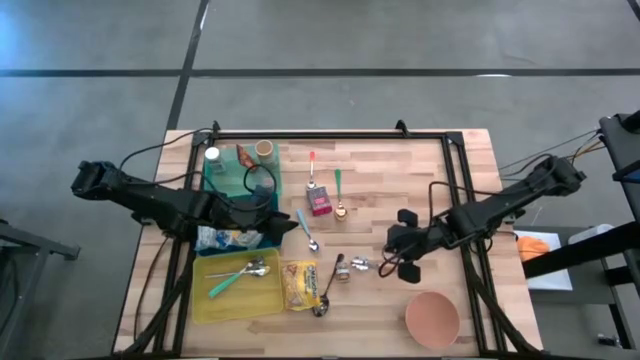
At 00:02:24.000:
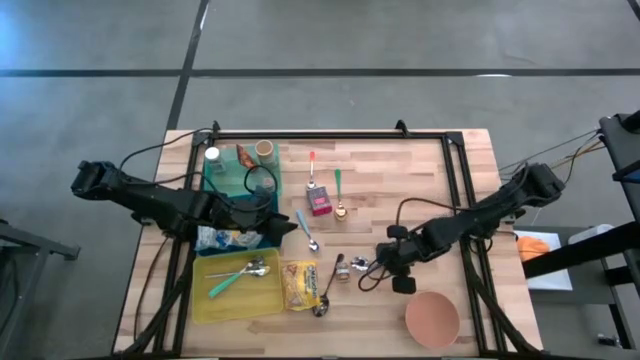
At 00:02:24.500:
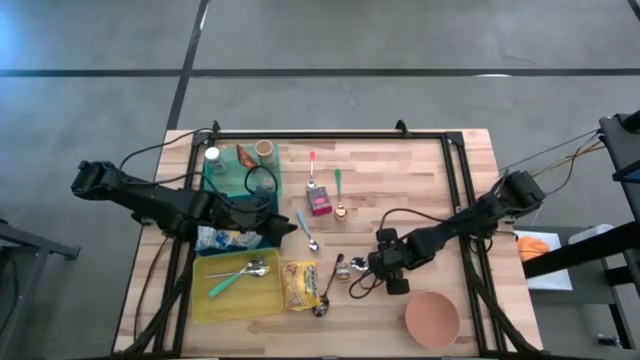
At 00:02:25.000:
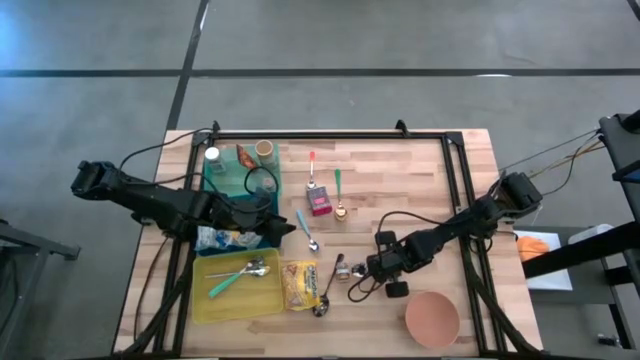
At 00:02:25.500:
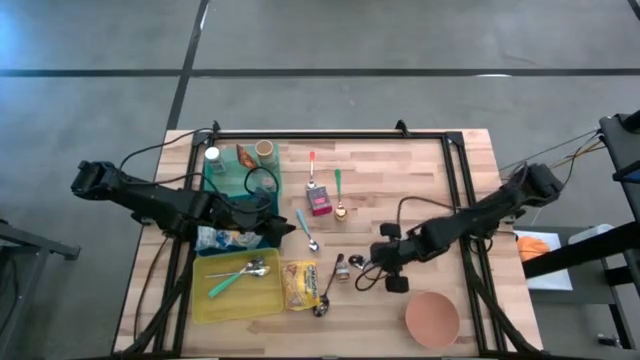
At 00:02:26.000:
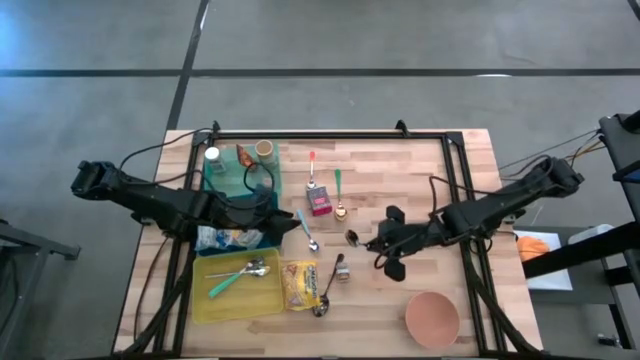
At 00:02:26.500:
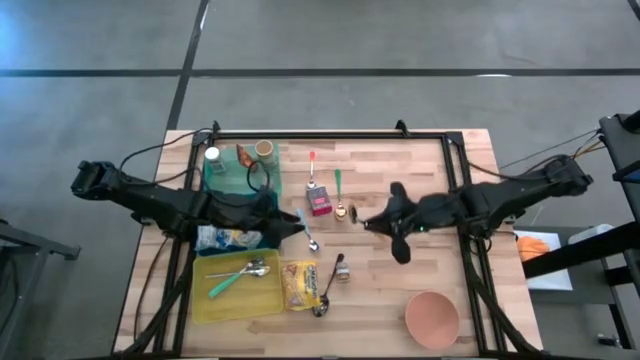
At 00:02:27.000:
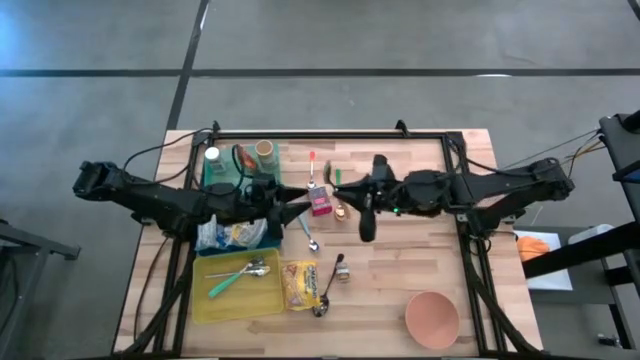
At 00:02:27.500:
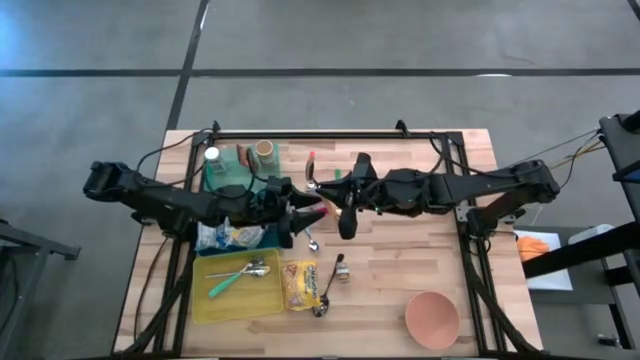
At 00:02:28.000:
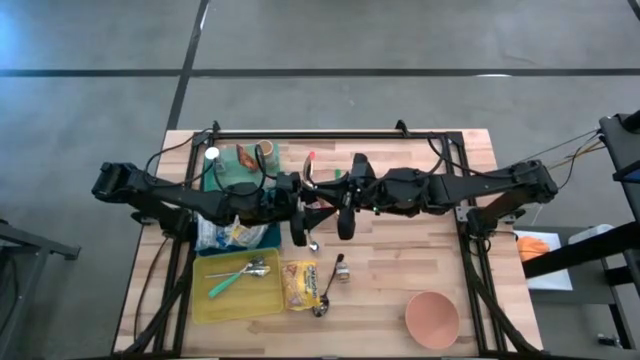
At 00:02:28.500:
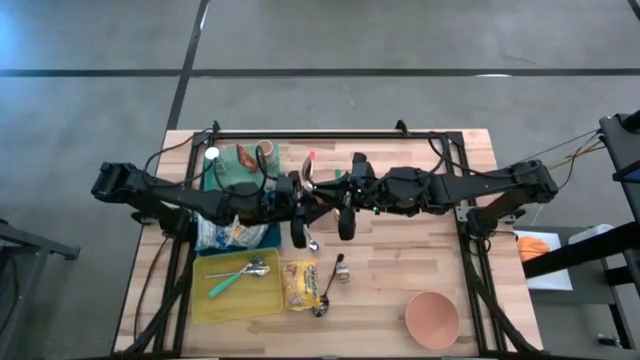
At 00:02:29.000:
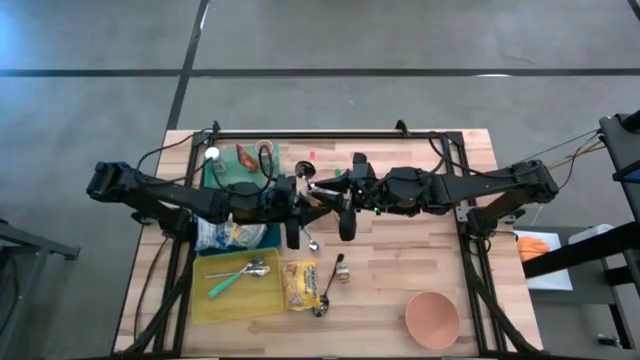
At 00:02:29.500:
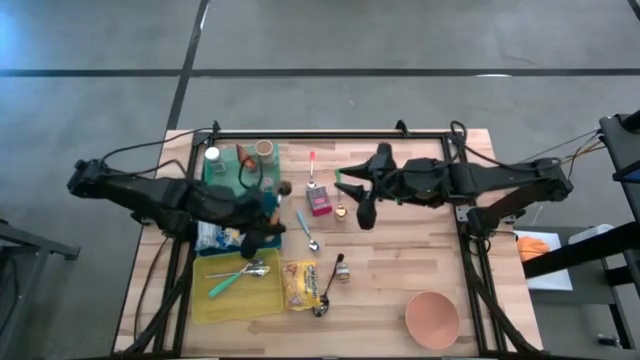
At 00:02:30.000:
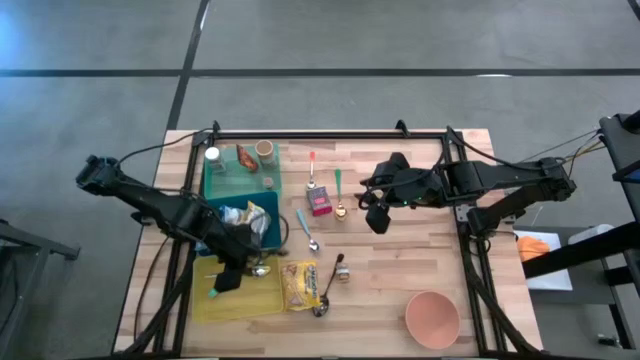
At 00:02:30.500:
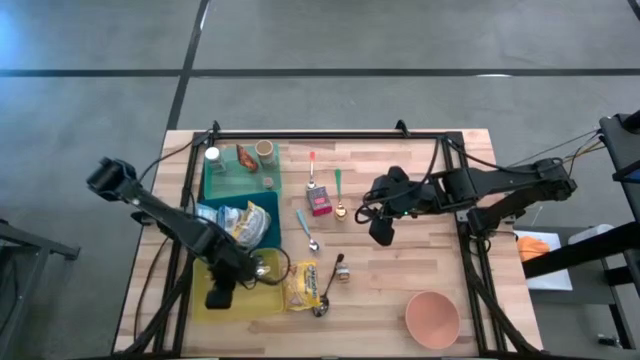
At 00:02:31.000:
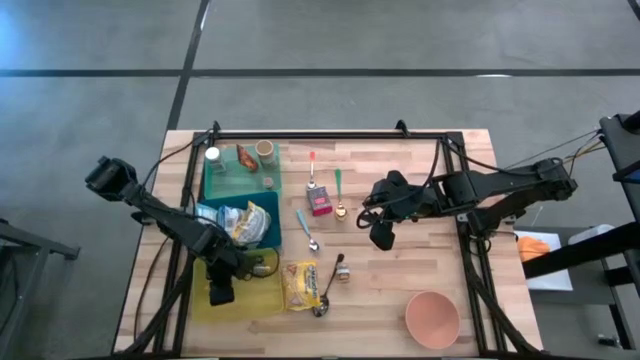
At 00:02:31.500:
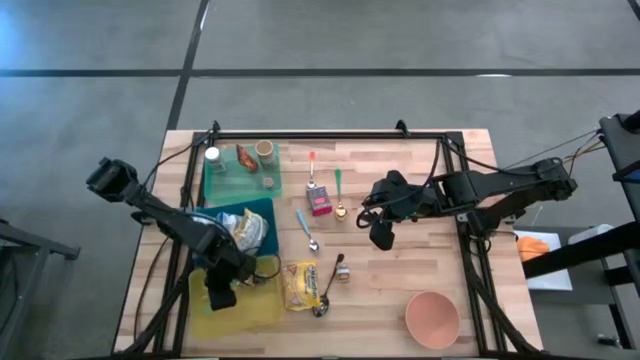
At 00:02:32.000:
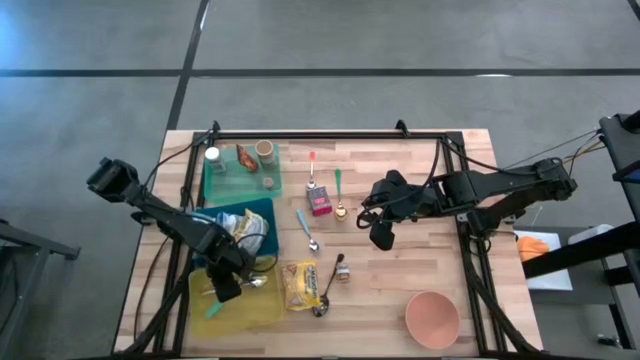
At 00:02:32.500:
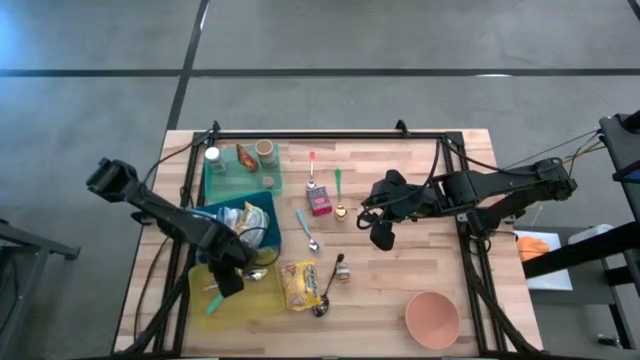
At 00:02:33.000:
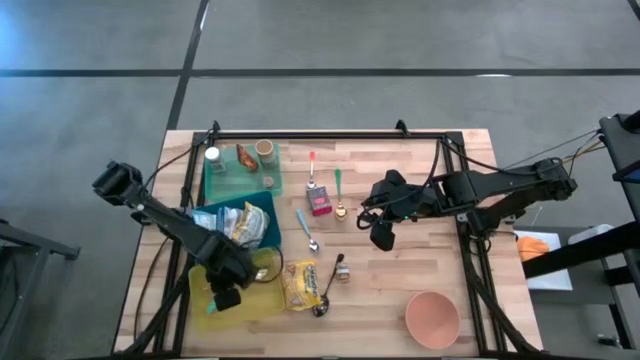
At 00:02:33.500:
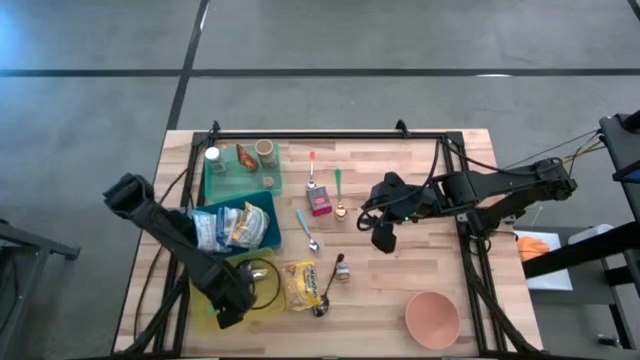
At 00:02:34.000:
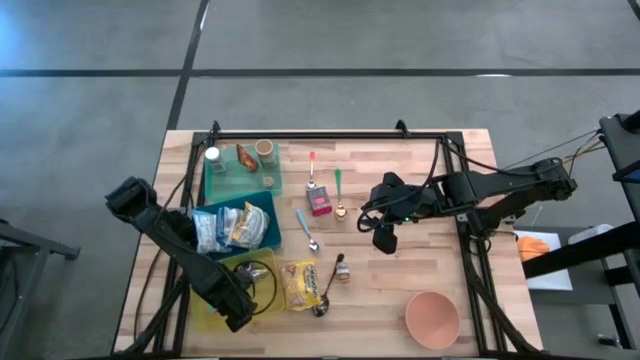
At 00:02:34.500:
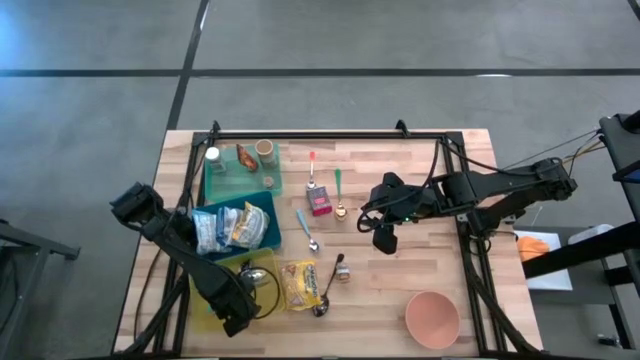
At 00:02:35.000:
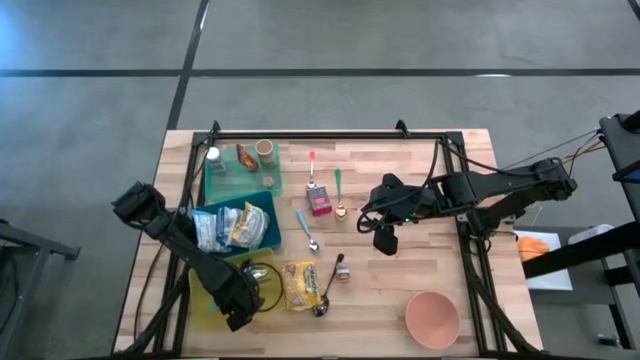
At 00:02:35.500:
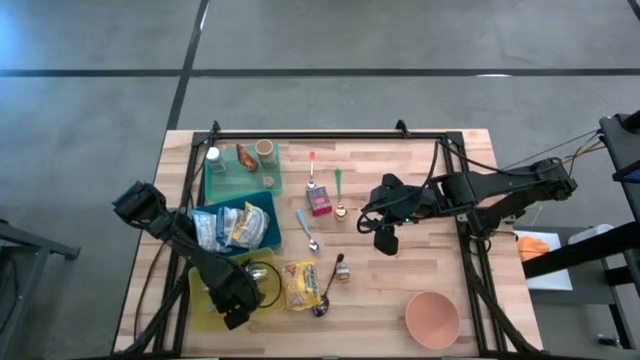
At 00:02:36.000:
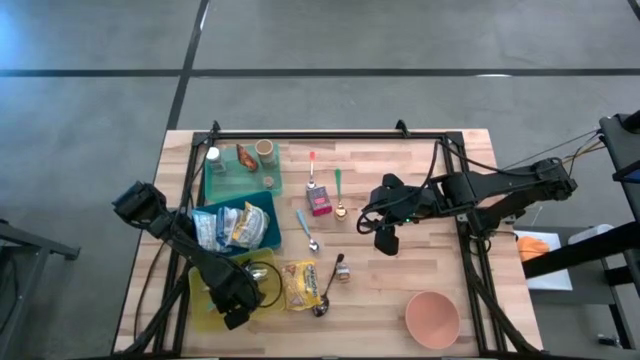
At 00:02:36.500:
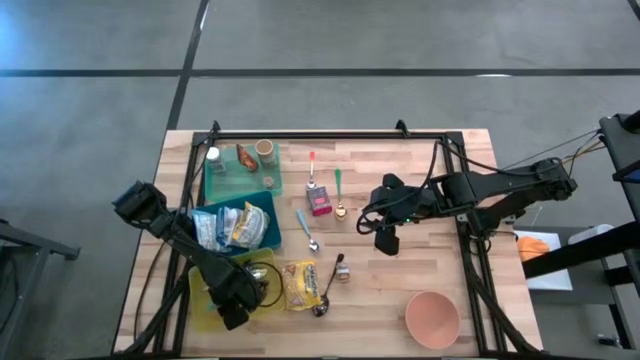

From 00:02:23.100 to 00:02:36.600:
Put the yellow spoon into the yellow bin

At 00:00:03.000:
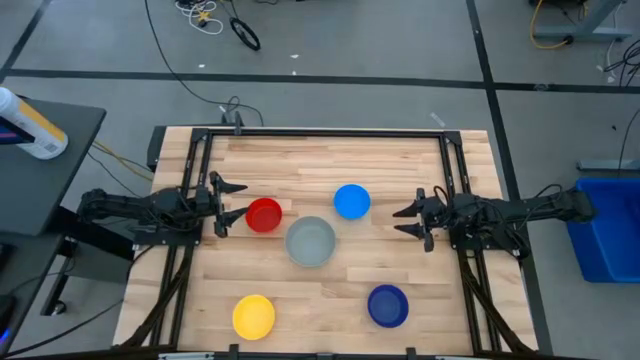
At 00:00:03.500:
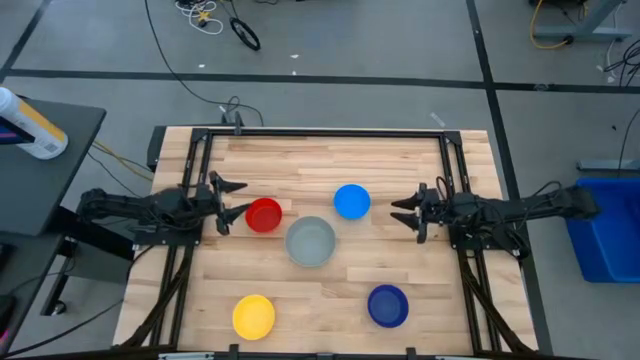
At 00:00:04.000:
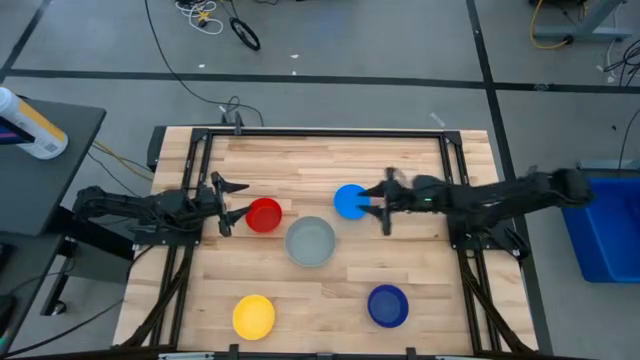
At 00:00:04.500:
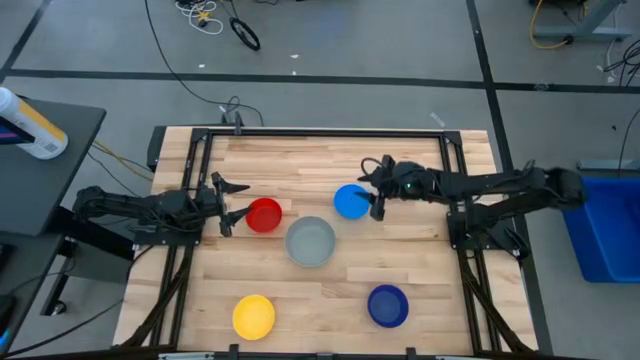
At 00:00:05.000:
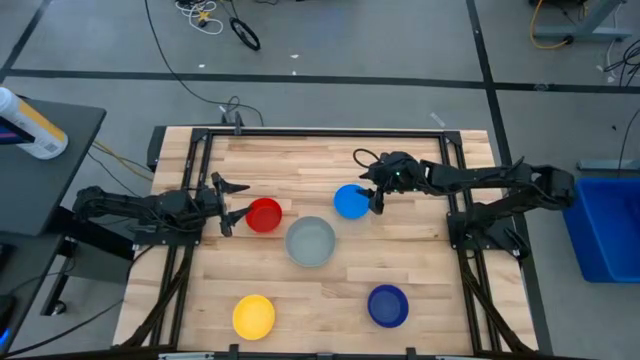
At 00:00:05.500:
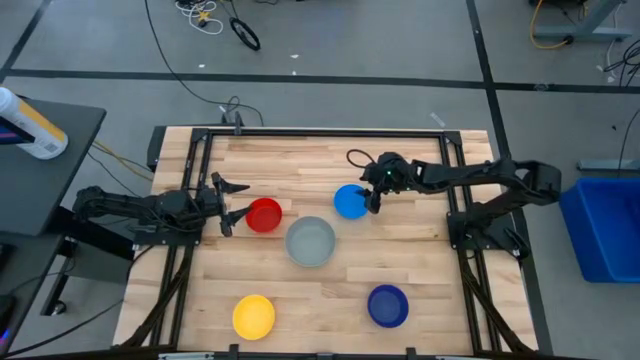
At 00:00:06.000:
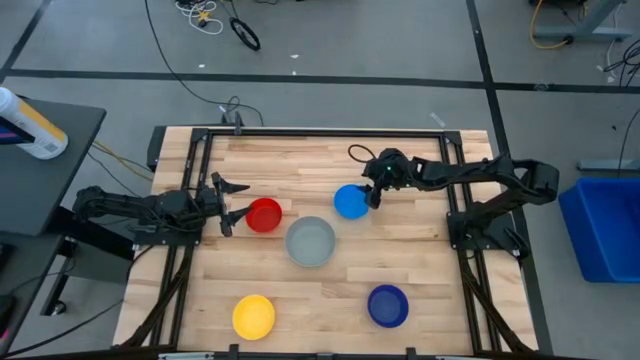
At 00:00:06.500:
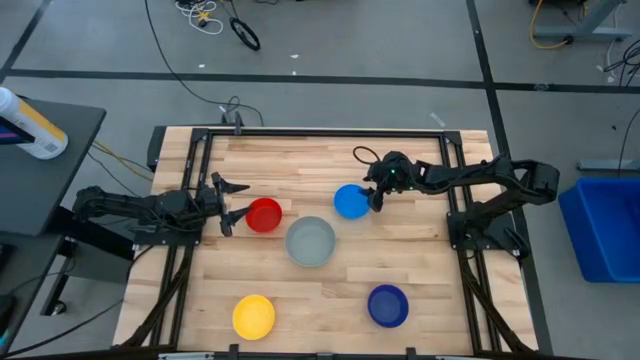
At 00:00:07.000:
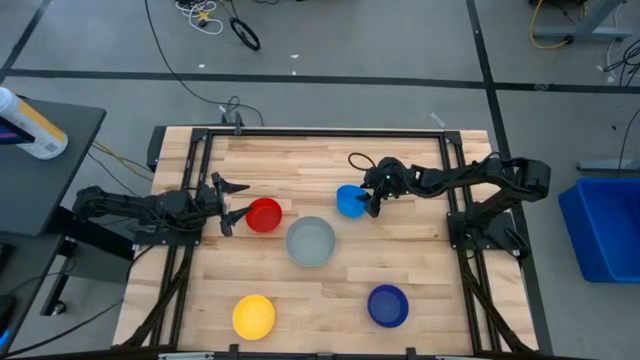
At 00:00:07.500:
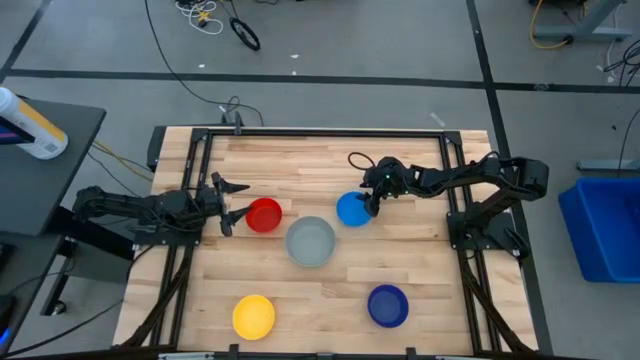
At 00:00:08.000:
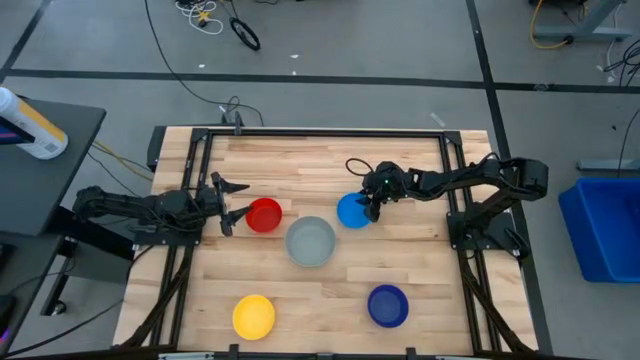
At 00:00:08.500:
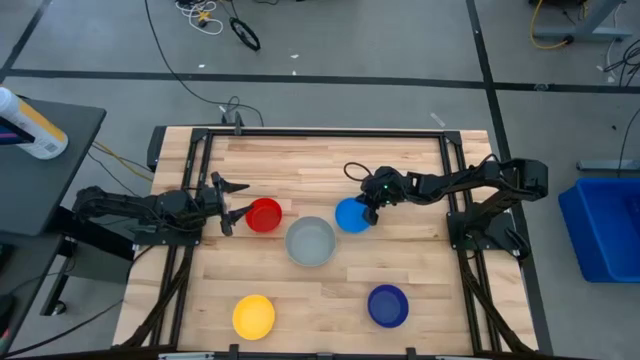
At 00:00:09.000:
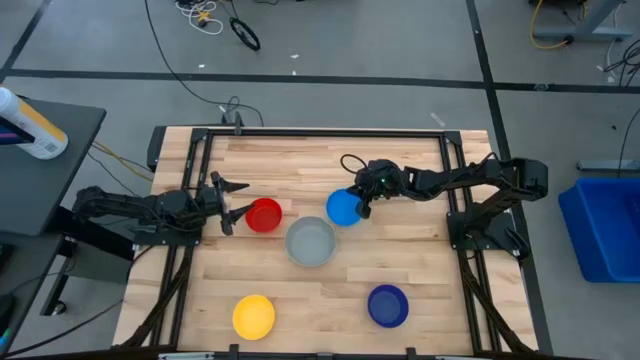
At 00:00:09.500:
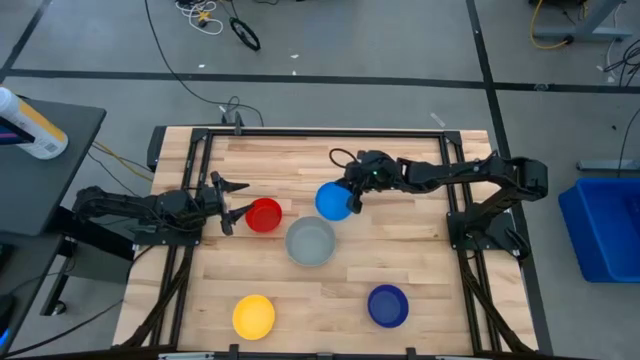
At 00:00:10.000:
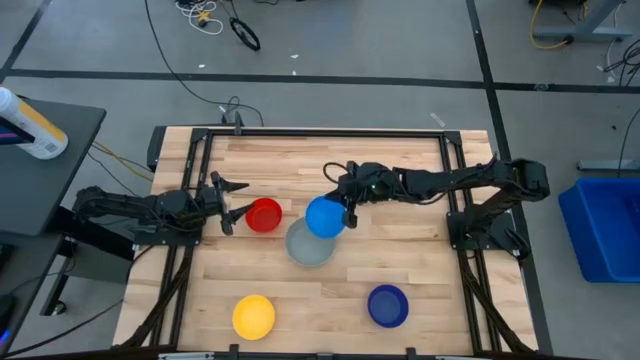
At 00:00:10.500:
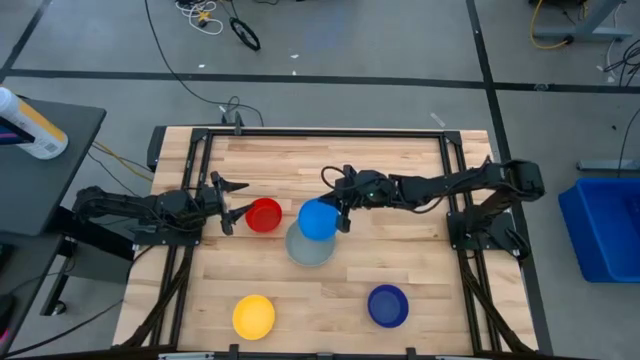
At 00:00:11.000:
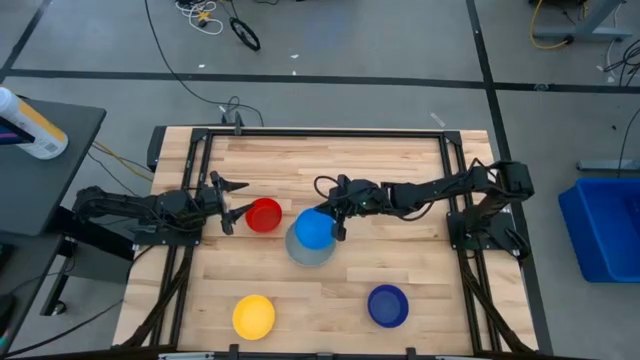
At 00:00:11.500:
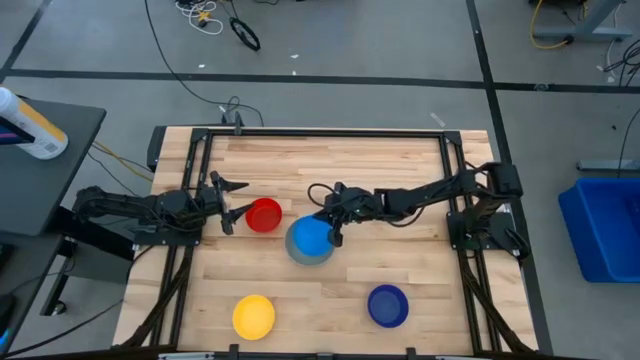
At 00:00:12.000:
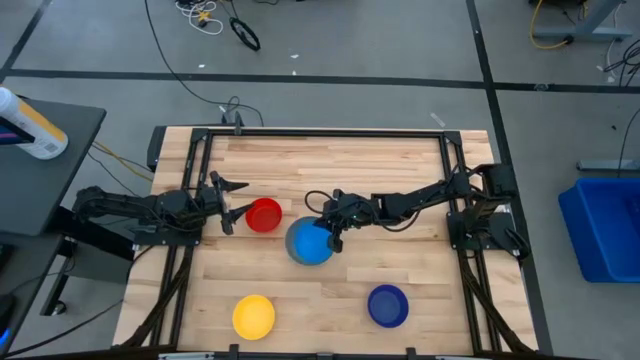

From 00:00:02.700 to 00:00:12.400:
Stack the blue bowl on the gray bowl
